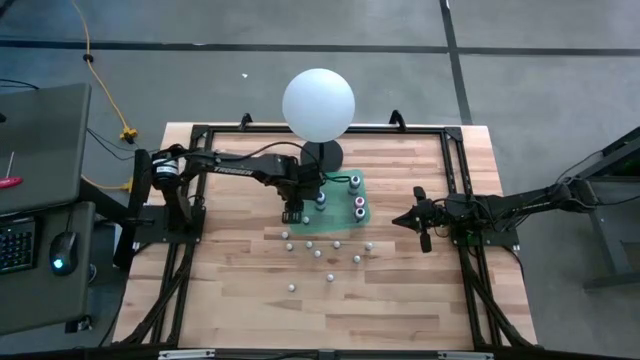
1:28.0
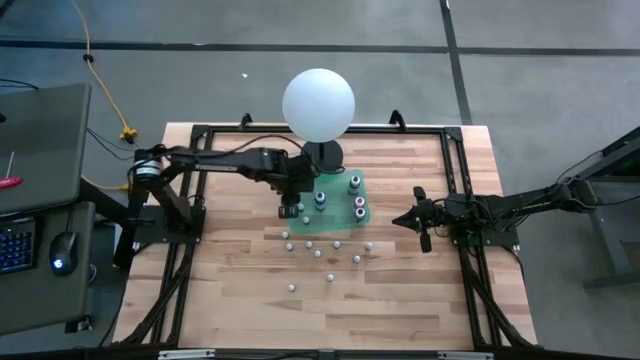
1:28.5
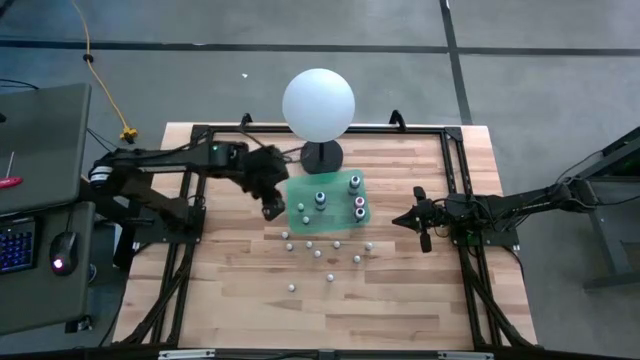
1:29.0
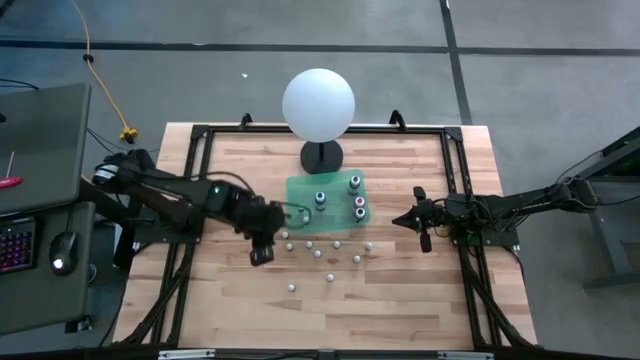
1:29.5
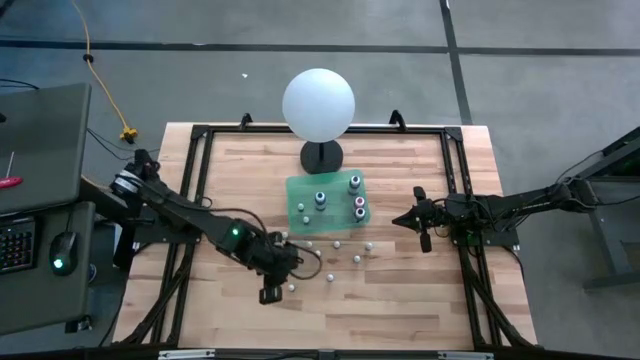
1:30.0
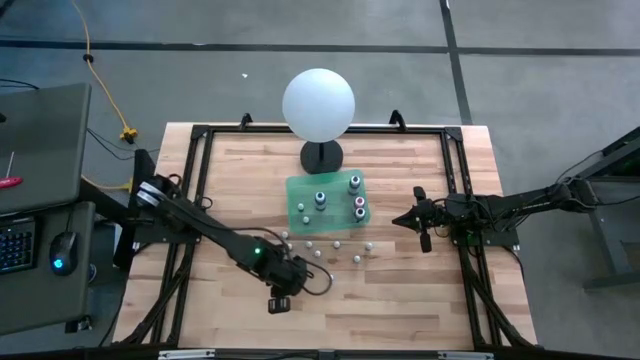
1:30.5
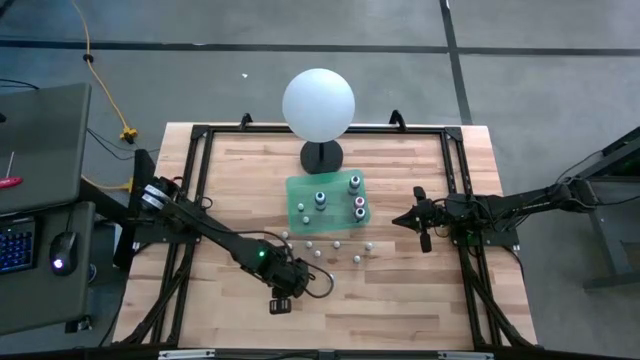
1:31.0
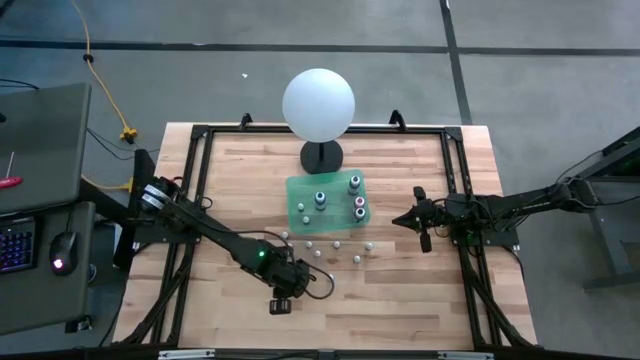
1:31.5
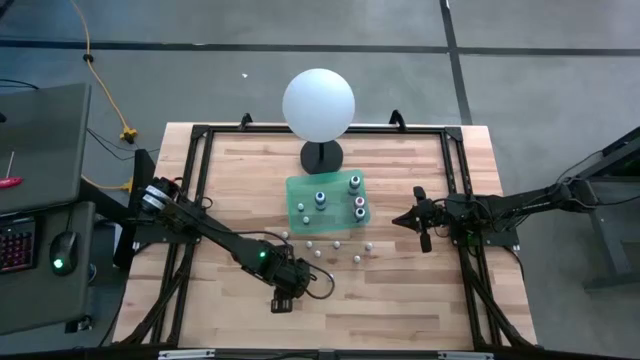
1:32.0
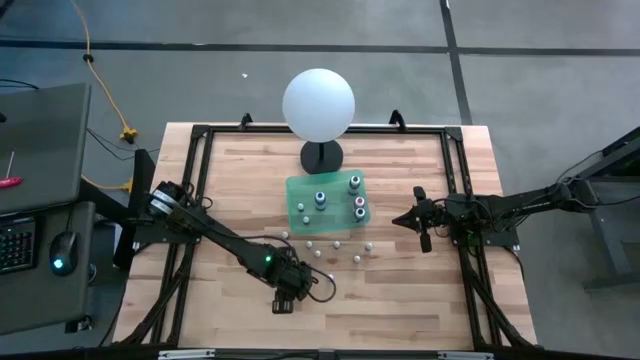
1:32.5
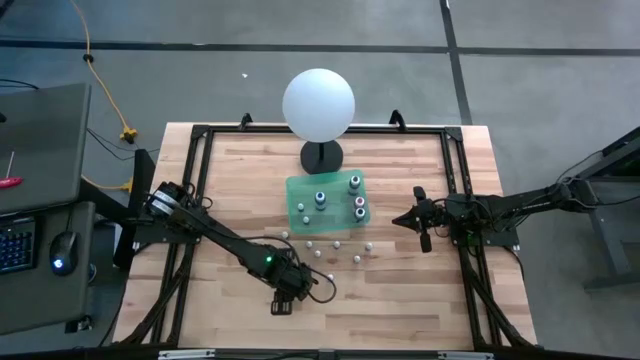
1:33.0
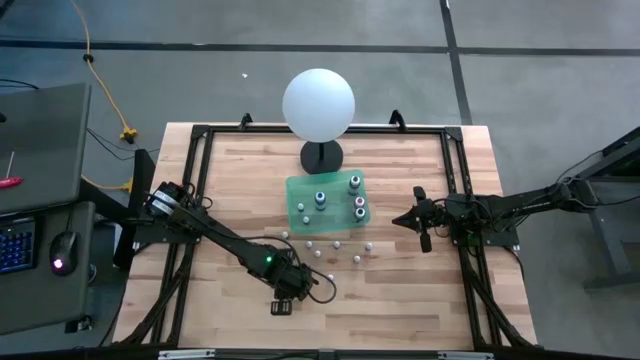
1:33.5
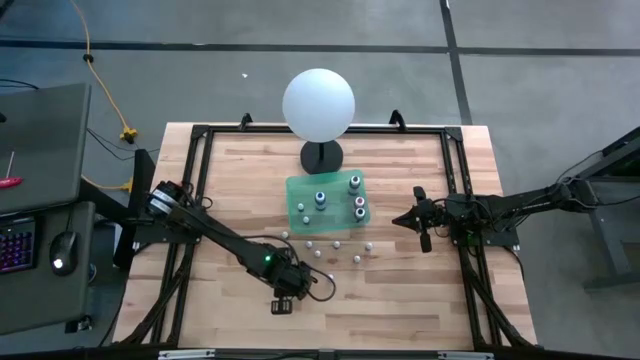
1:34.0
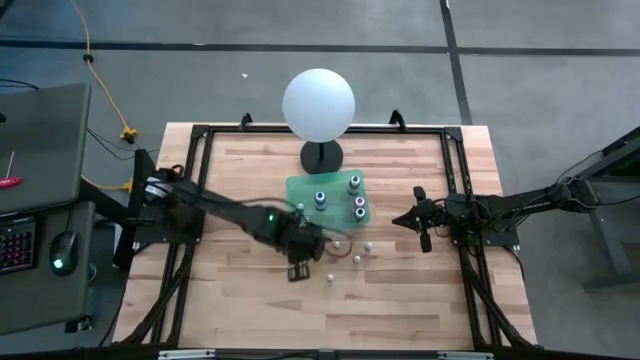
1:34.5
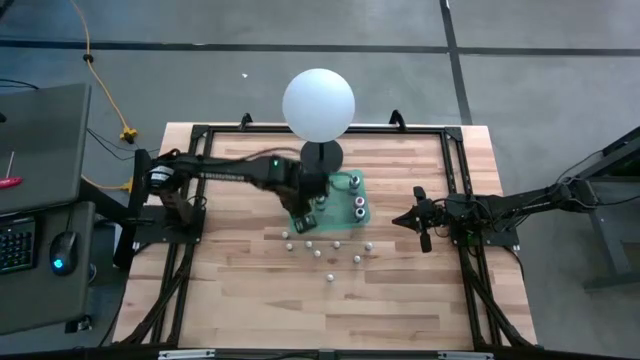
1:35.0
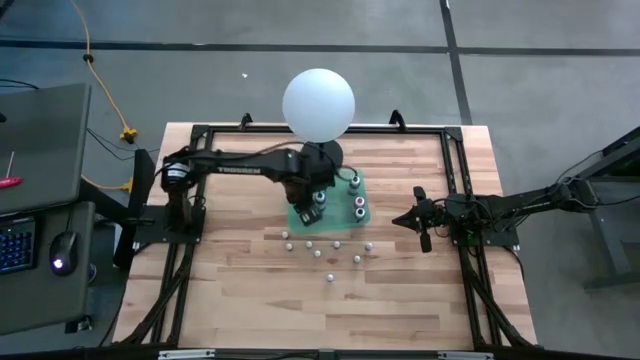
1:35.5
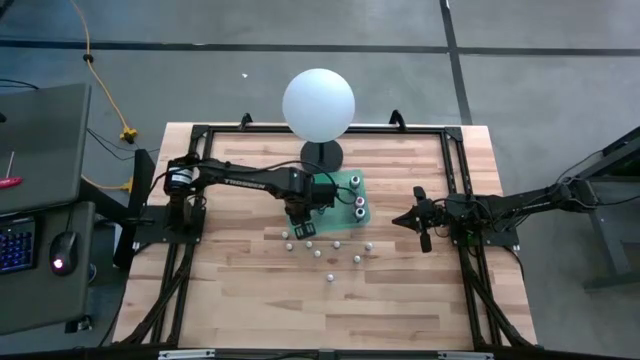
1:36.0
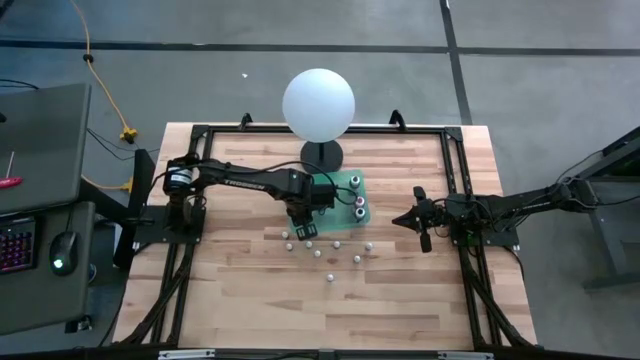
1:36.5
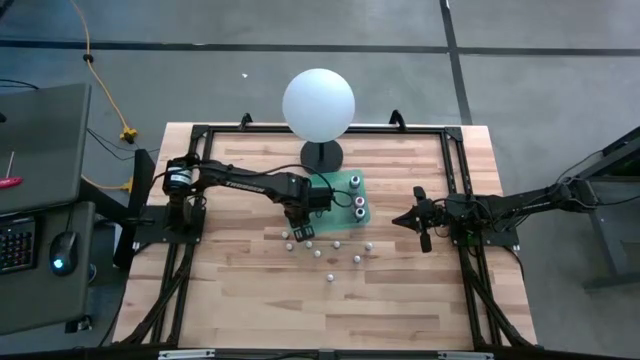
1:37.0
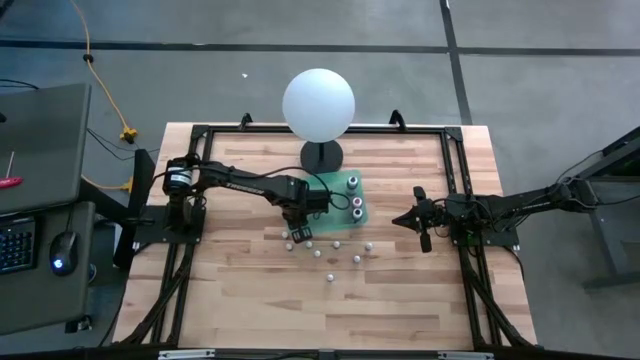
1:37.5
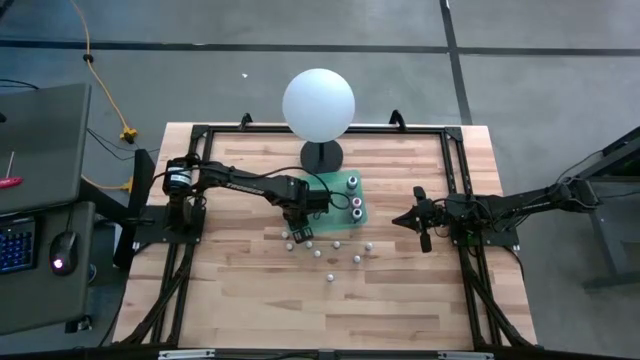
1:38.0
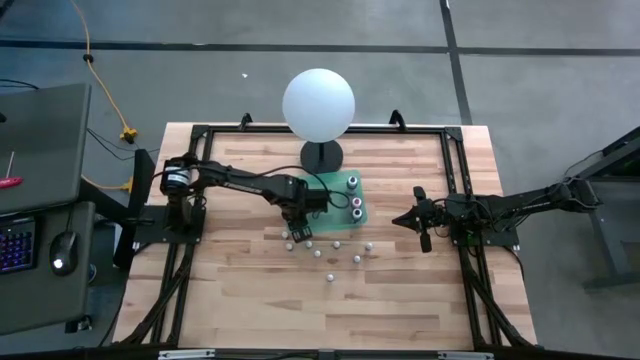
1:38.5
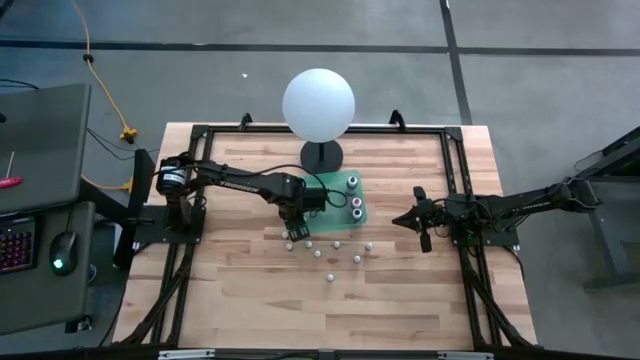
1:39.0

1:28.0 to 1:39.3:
Task: Pick & Place food coloring
Put the top small green food coloring bottle into the bin

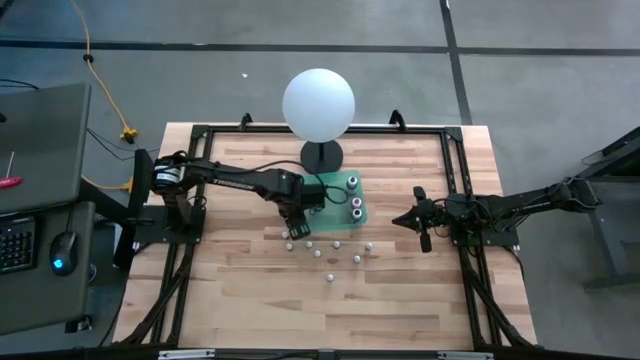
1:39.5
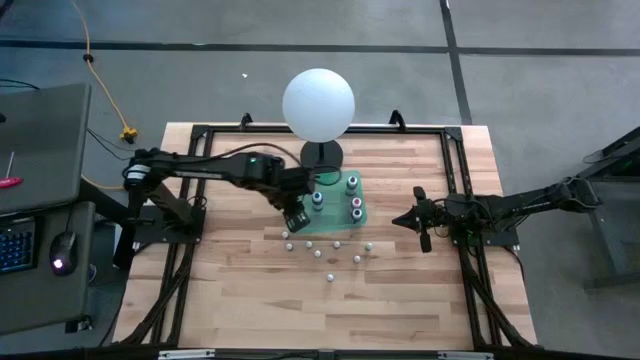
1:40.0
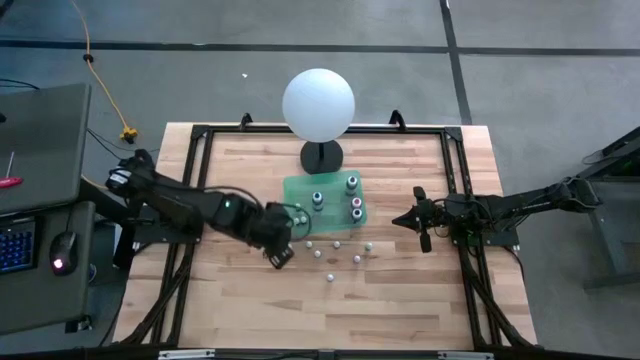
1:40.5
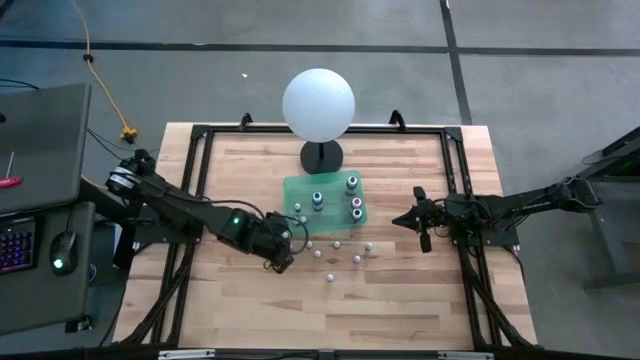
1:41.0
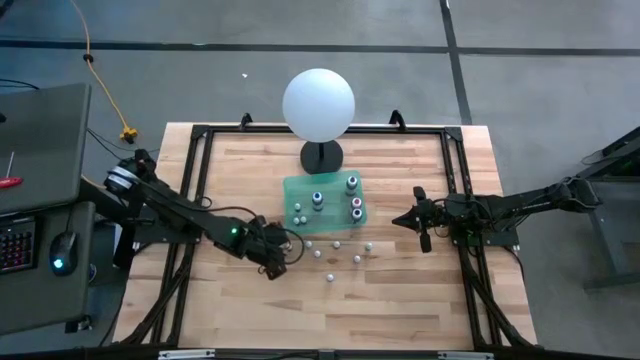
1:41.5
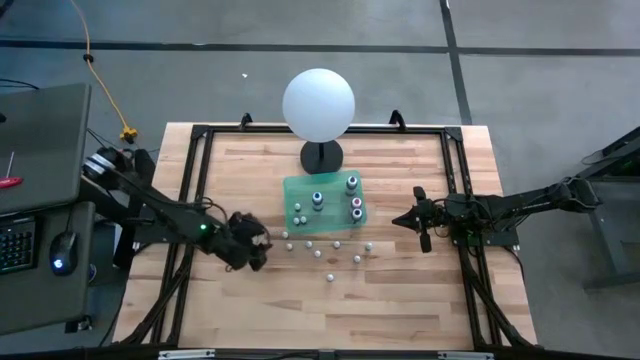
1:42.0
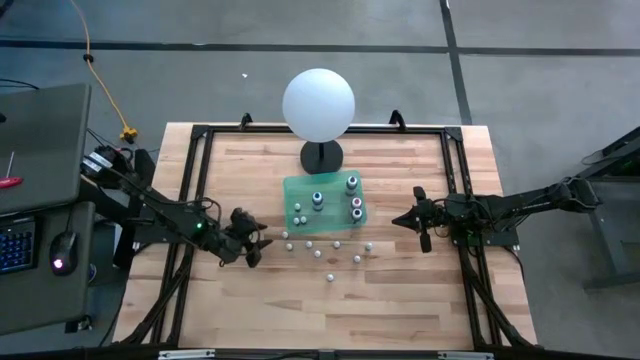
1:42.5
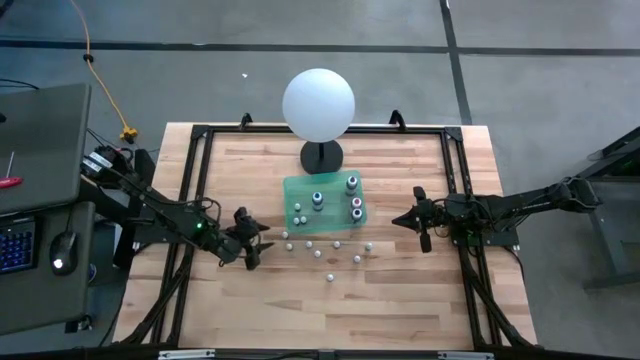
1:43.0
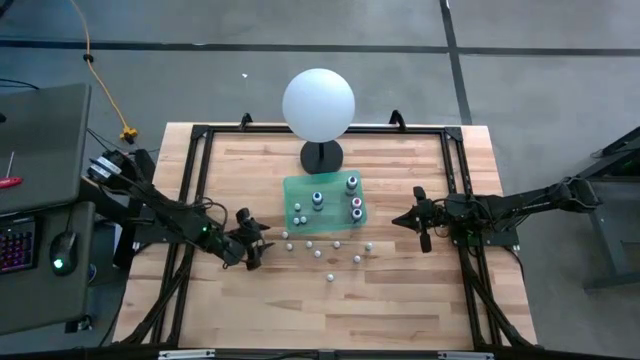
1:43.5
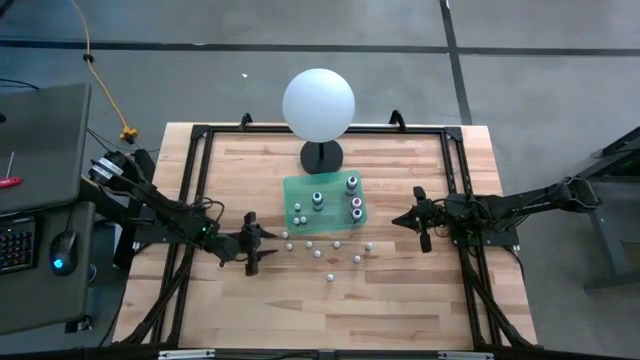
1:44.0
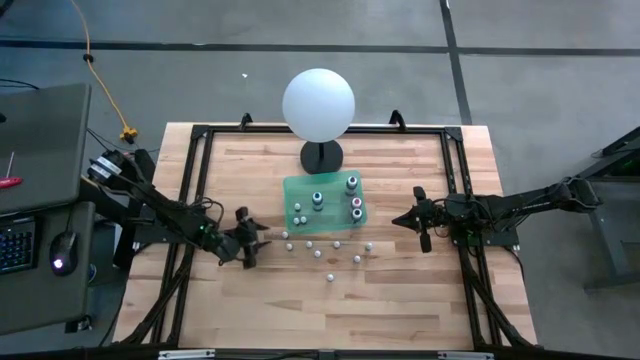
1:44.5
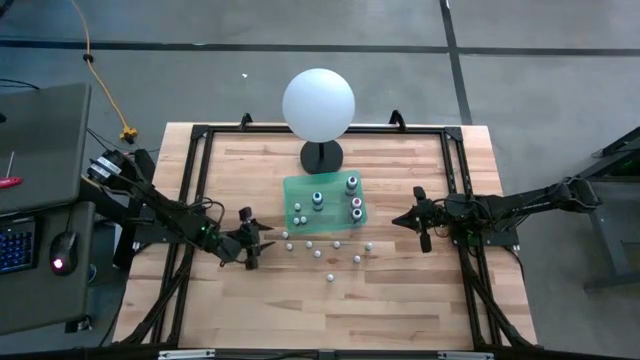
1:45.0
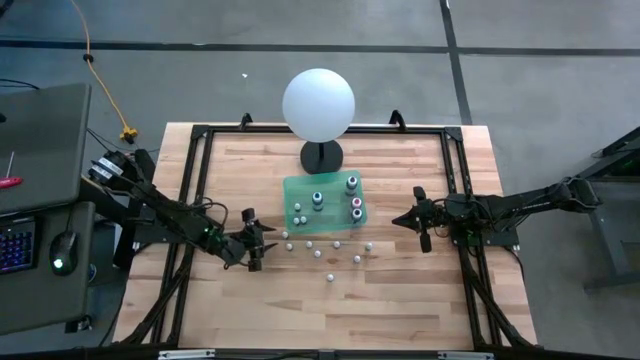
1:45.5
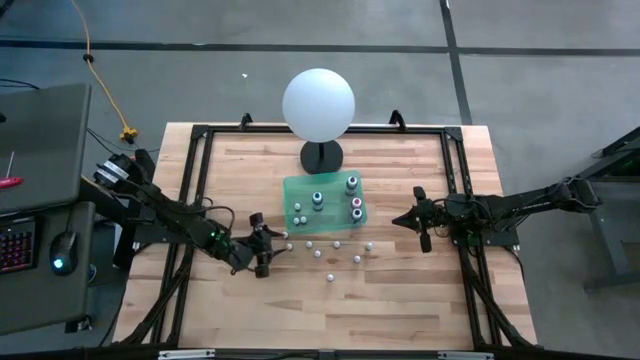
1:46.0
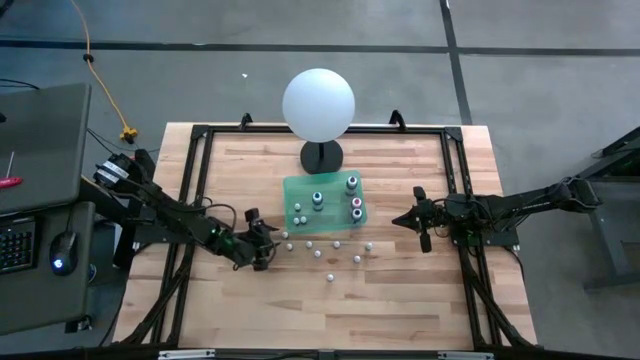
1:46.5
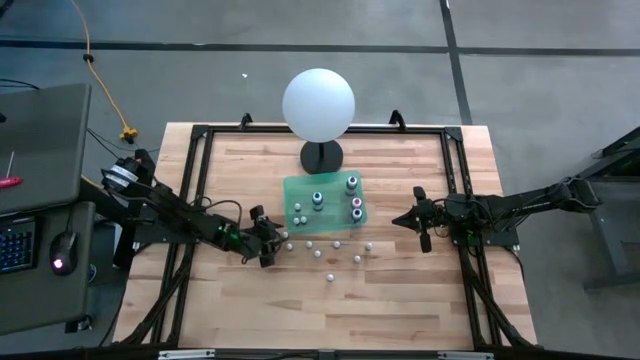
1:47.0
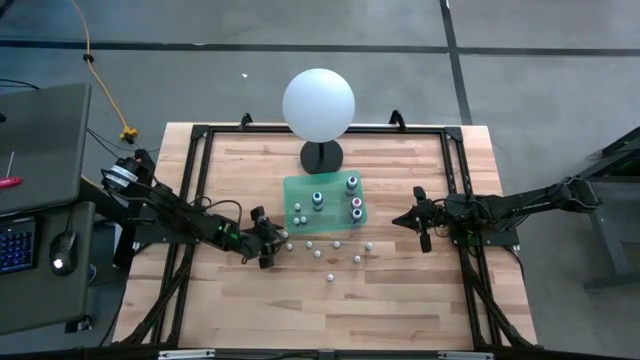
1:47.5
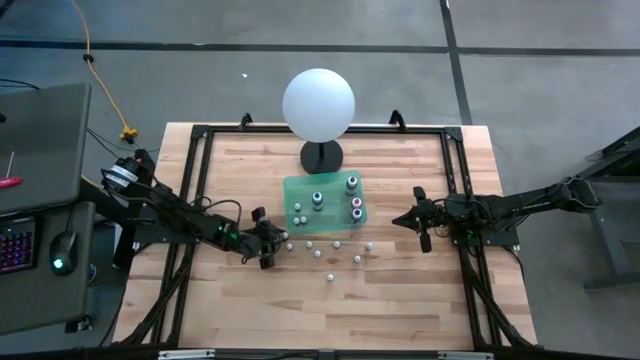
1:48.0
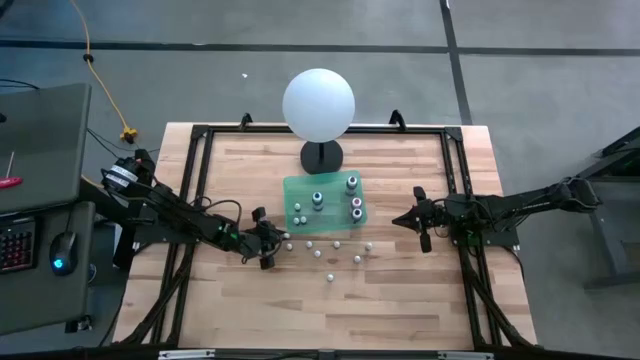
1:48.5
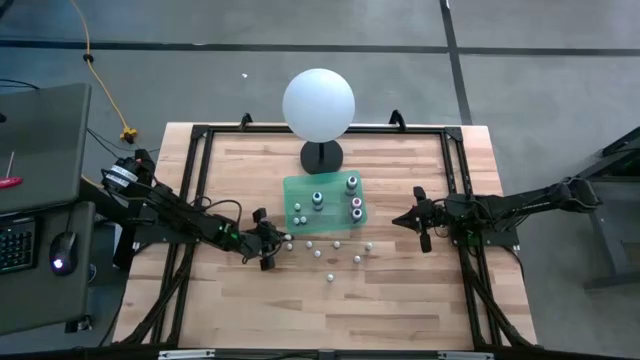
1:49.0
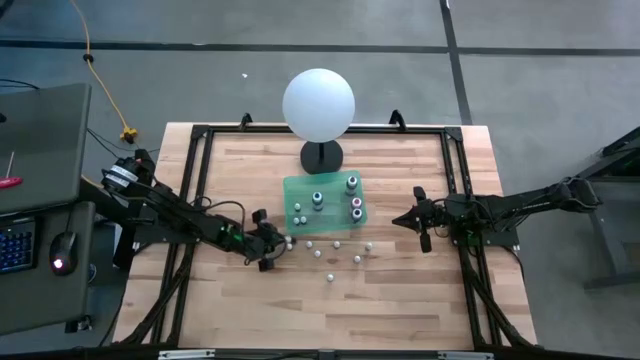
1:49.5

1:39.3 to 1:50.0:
Put the small green food coloring bottle into the bin
